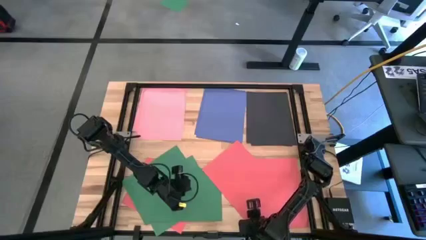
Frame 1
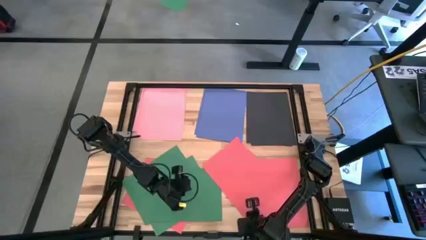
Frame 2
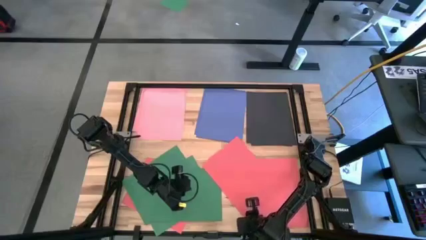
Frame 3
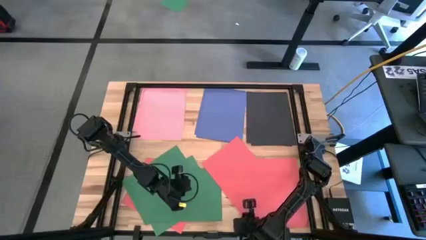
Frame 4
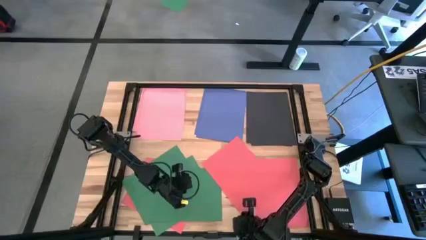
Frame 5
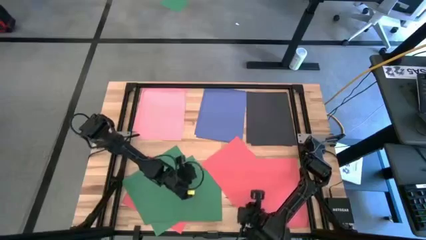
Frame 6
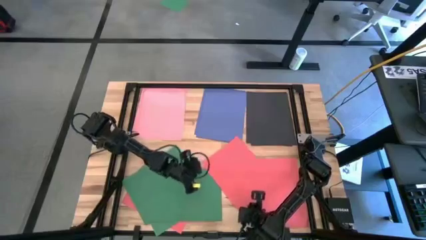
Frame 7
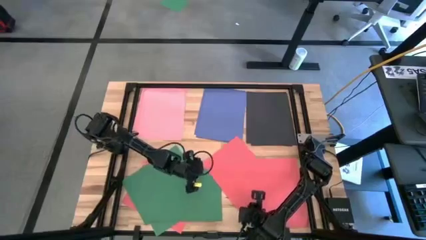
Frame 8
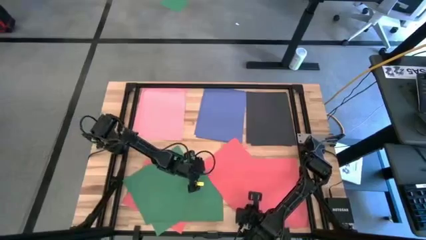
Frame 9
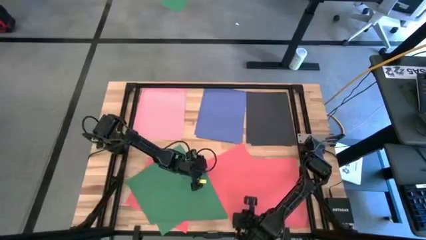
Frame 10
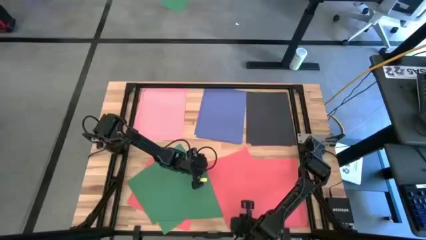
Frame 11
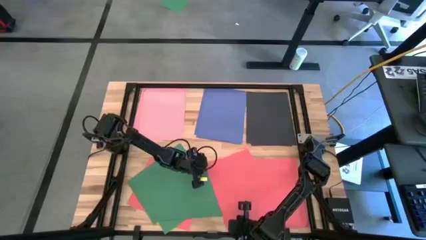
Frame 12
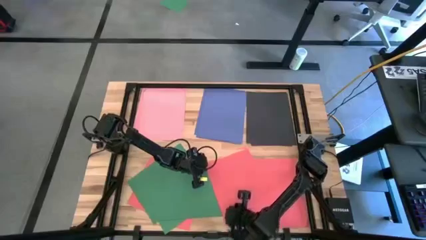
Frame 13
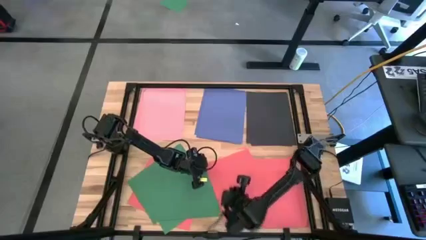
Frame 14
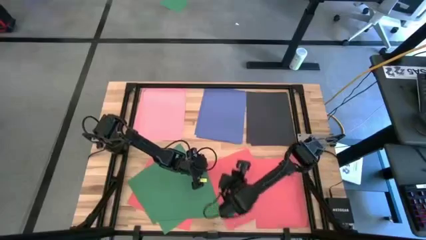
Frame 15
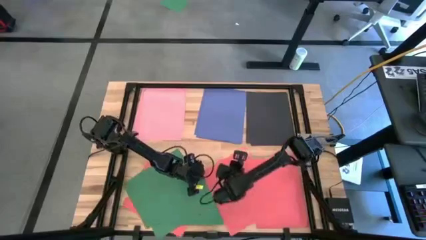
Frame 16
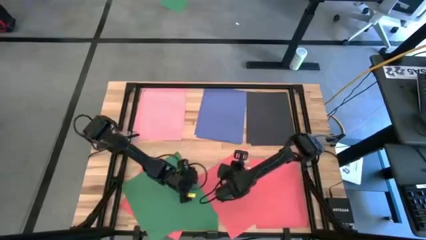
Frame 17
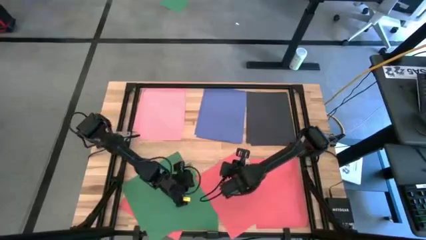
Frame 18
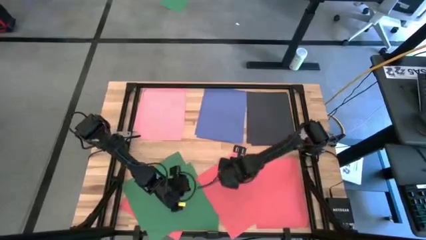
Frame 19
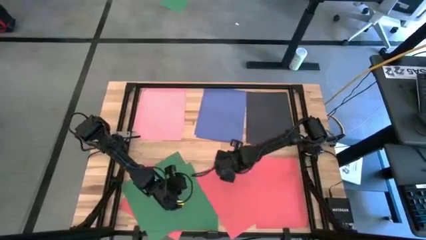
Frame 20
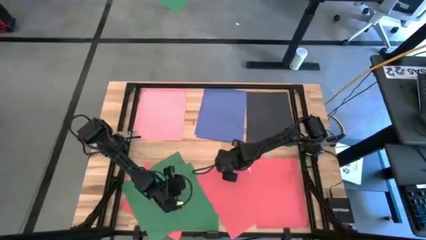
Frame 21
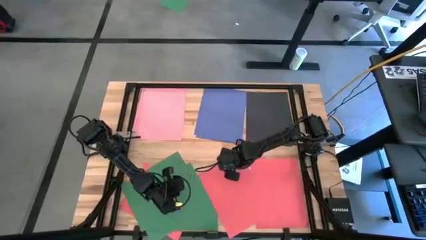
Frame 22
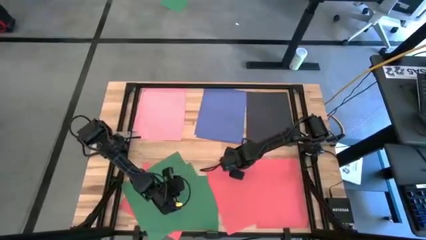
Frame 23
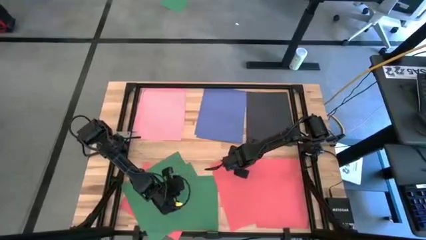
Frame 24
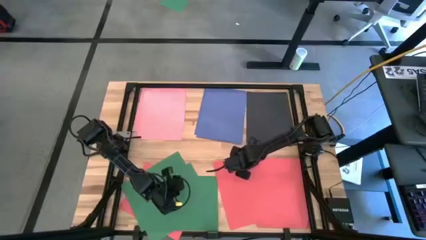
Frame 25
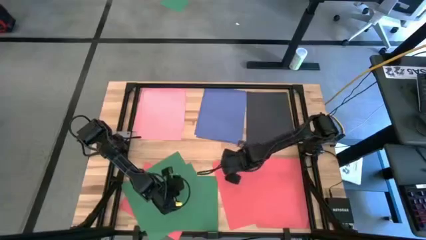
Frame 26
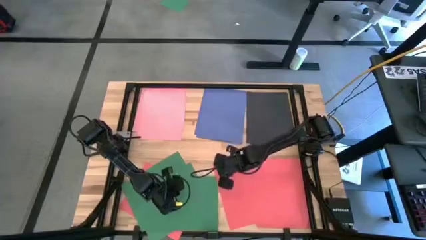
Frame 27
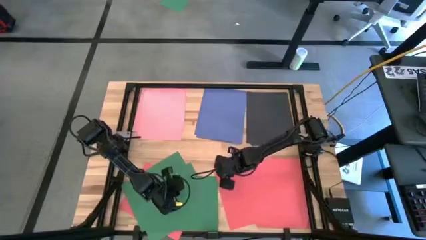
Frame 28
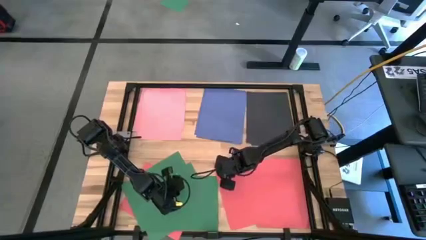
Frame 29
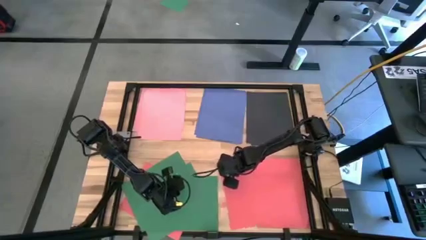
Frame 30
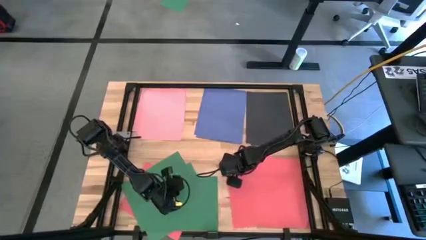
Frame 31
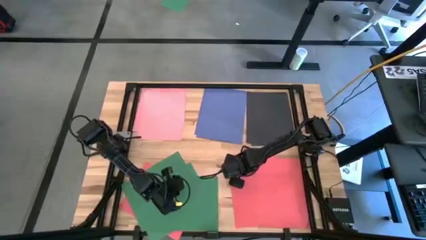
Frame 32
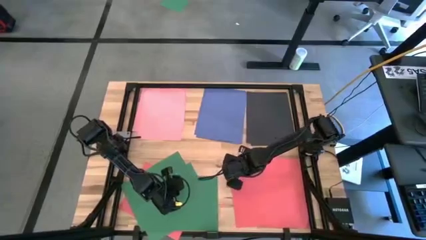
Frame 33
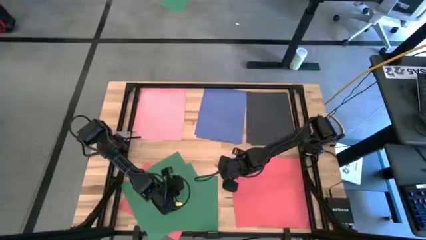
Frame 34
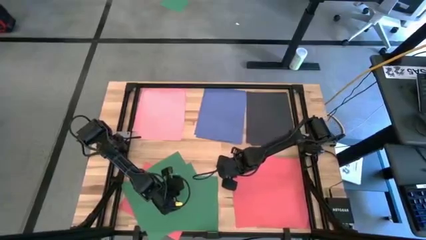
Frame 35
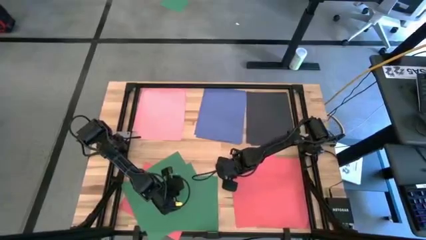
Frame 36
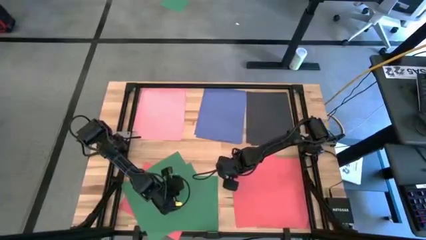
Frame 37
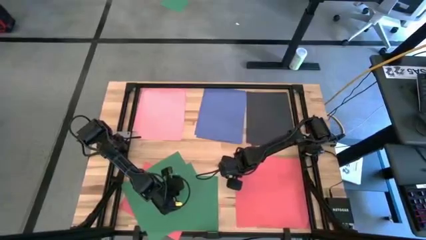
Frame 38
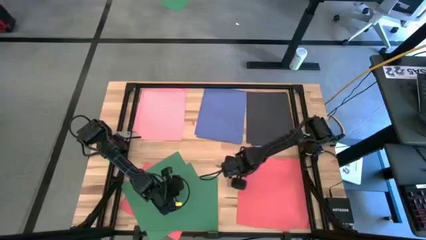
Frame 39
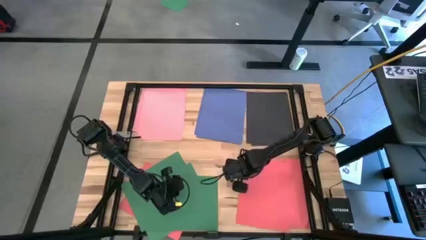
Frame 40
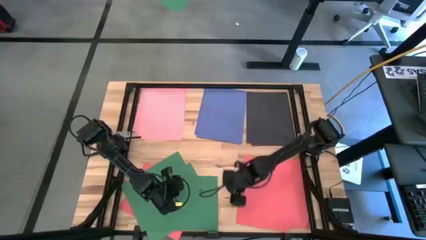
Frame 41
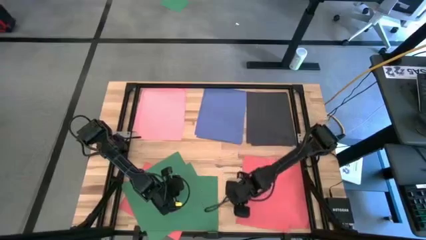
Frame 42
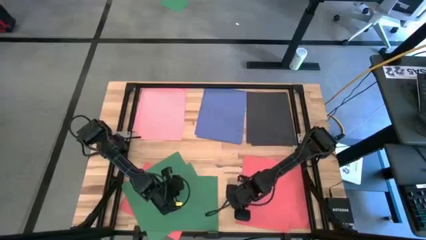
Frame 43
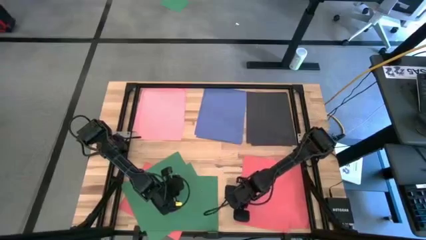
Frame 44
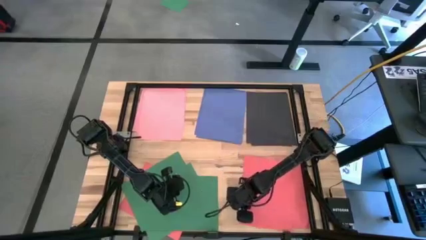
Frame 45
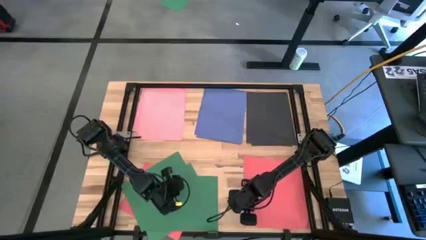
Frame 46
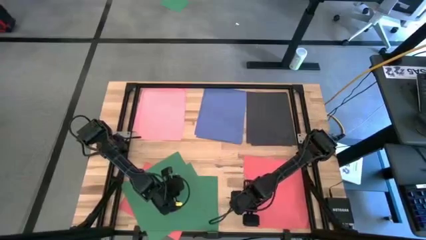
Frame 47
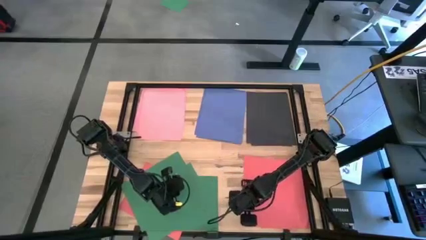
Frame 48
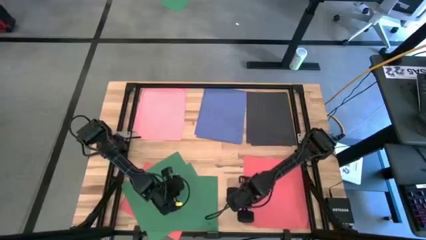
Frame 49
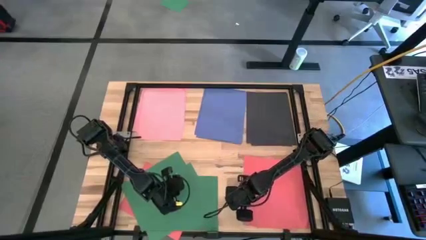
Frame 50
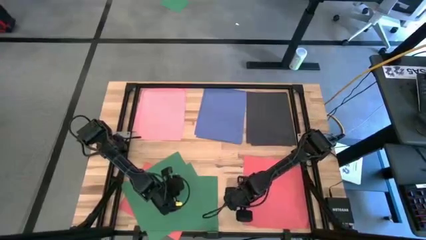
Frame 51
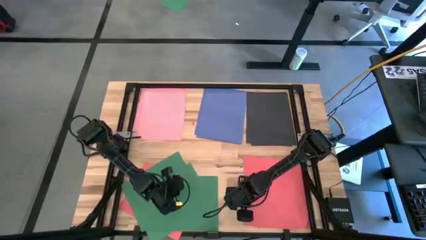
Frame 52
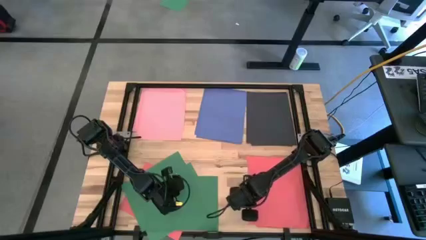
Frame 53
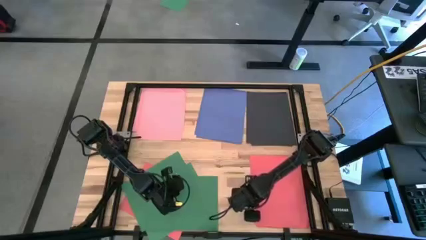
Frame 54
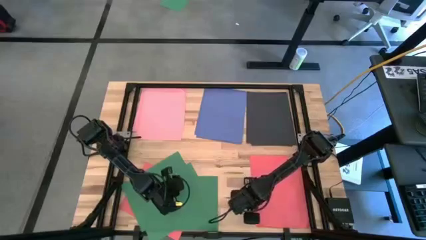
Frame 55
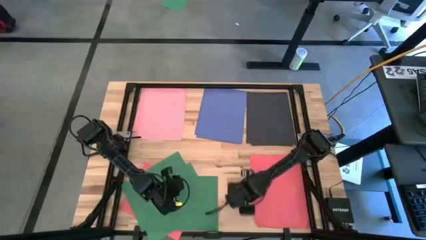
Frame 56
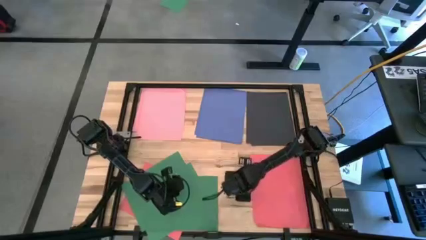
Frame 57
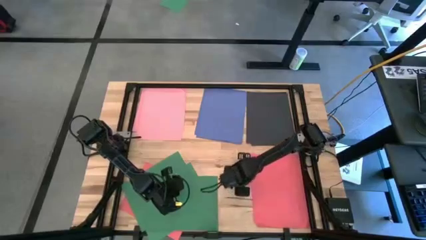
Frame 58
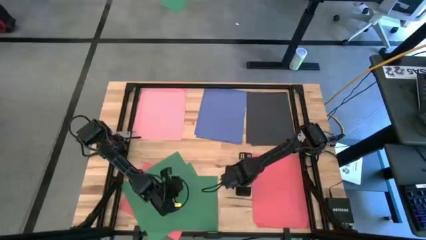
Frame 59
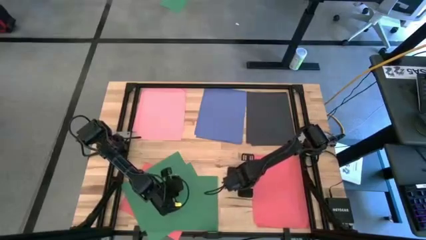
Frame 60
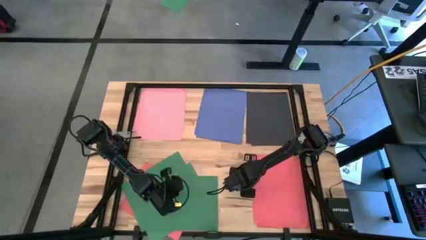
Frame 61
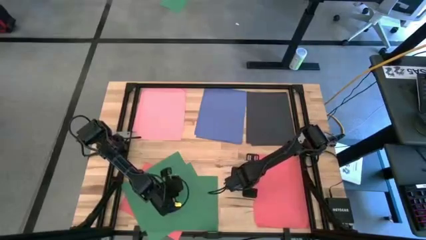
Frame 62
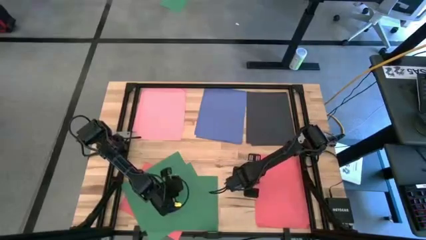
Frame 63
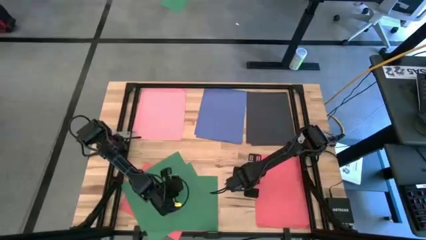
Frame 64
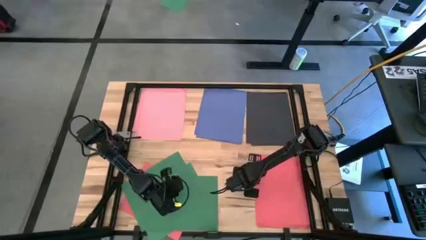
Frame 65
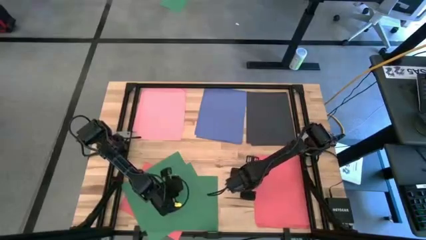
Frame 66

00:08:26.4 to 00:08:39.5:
Task: Organize paper
Stack the red paper on top of the other red paper on the table
